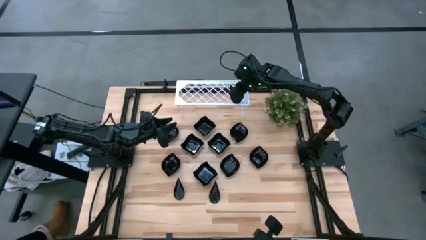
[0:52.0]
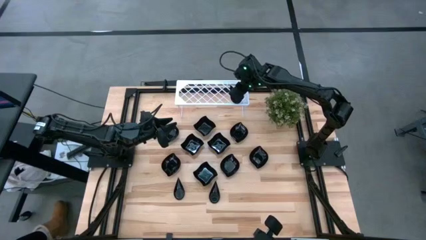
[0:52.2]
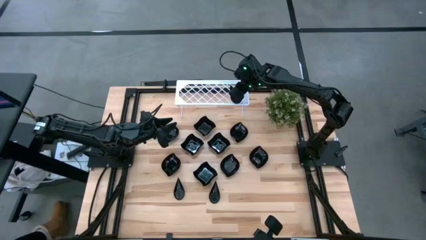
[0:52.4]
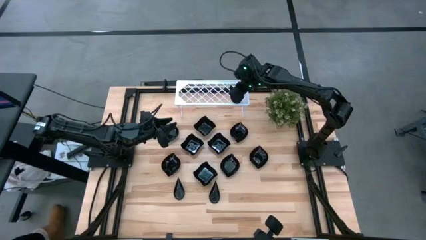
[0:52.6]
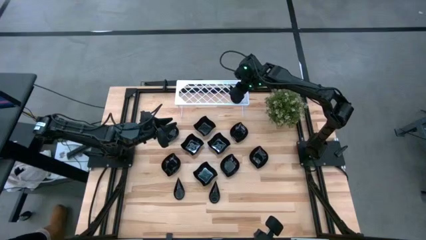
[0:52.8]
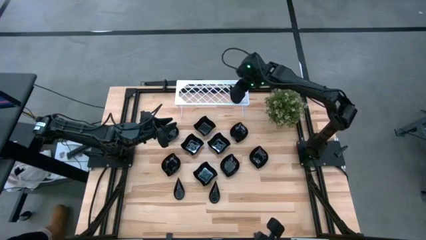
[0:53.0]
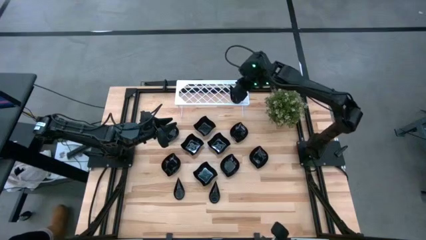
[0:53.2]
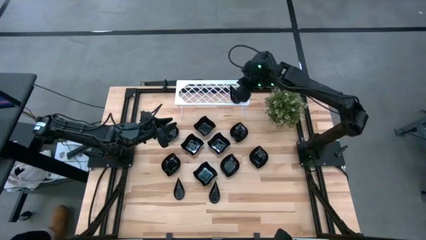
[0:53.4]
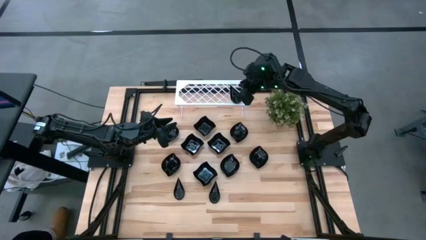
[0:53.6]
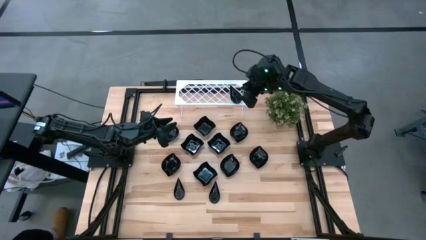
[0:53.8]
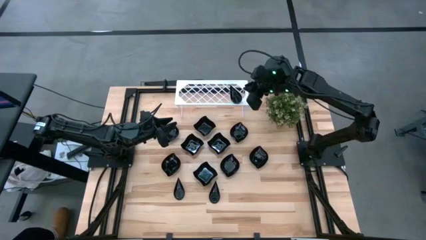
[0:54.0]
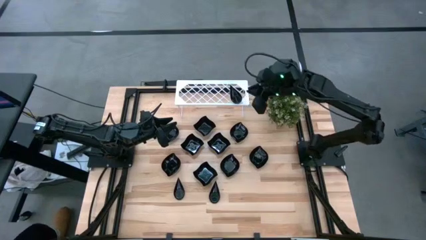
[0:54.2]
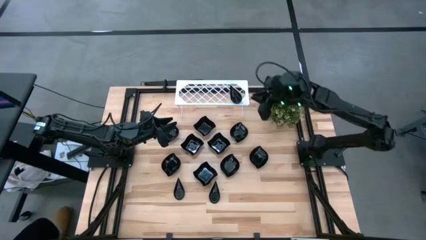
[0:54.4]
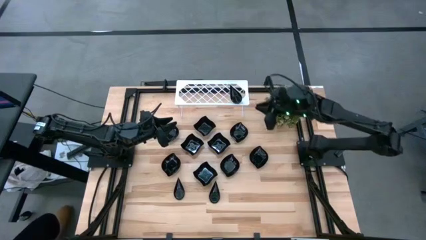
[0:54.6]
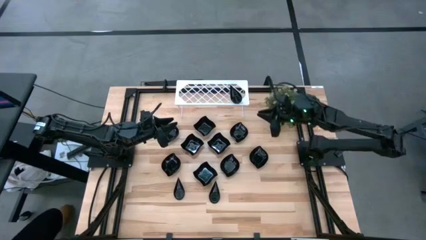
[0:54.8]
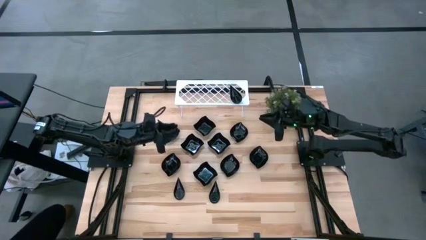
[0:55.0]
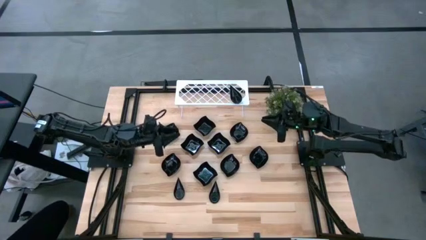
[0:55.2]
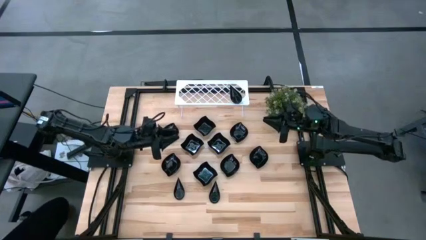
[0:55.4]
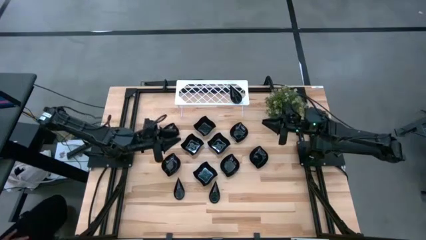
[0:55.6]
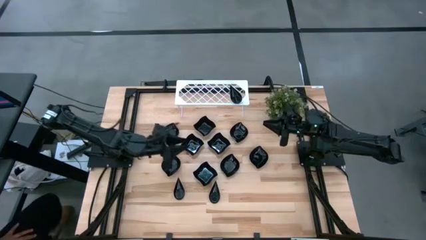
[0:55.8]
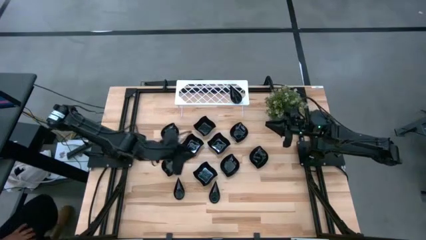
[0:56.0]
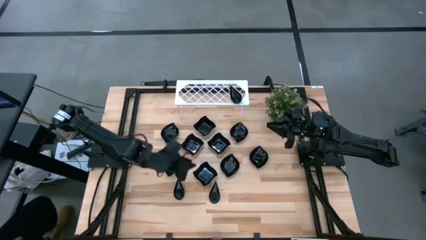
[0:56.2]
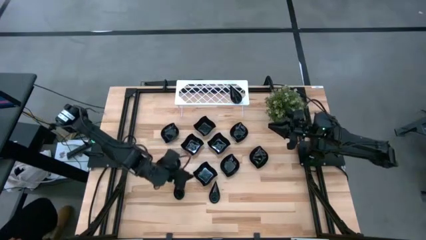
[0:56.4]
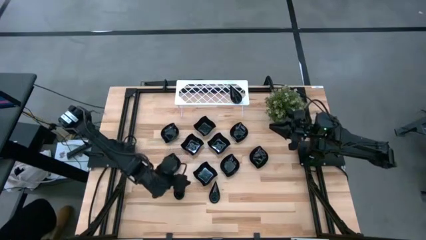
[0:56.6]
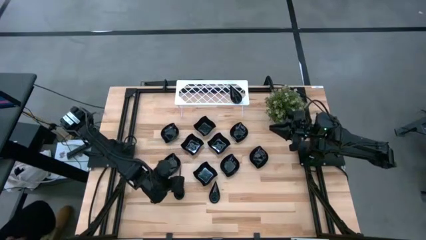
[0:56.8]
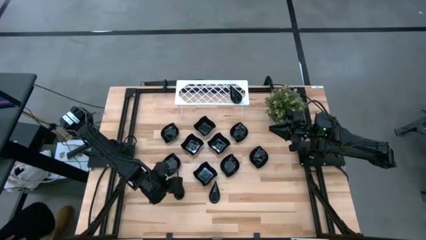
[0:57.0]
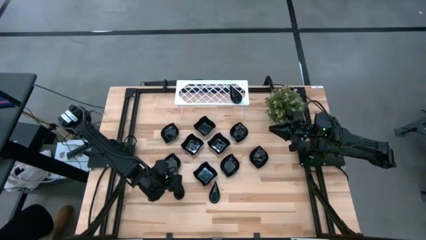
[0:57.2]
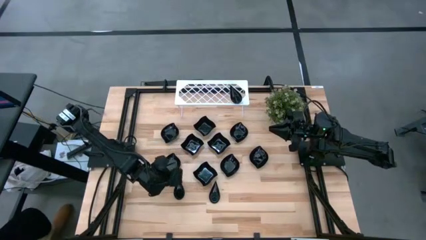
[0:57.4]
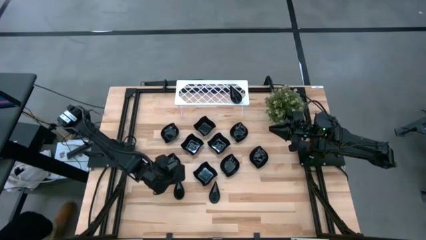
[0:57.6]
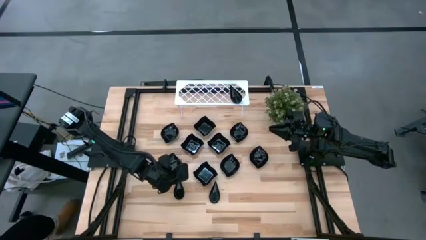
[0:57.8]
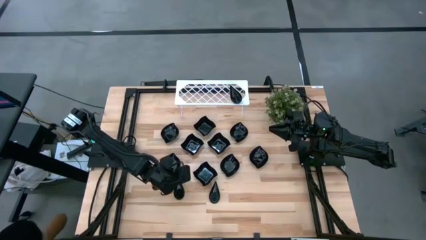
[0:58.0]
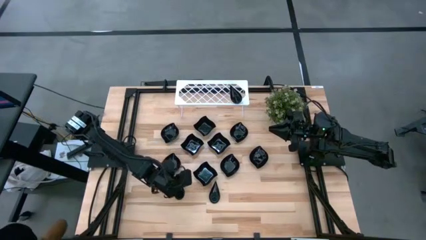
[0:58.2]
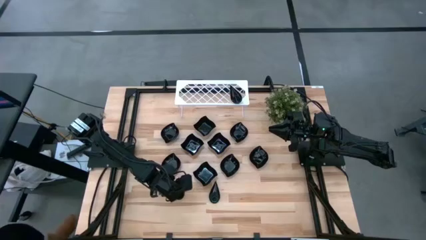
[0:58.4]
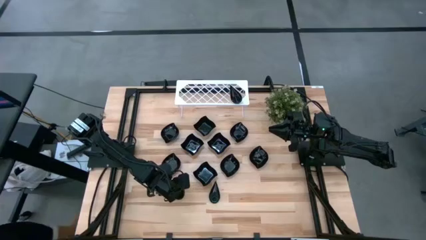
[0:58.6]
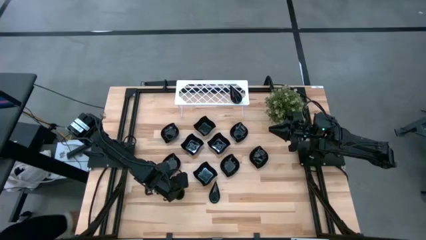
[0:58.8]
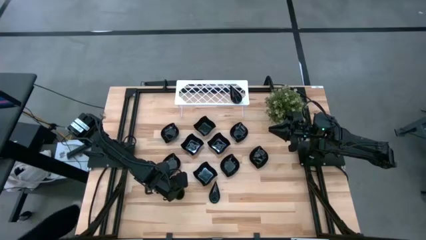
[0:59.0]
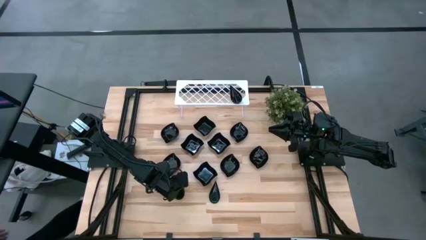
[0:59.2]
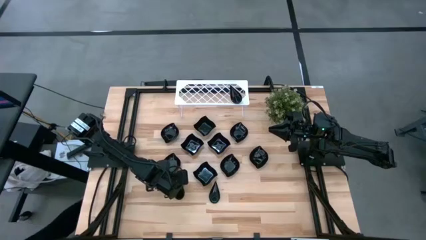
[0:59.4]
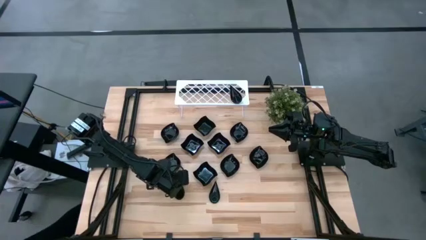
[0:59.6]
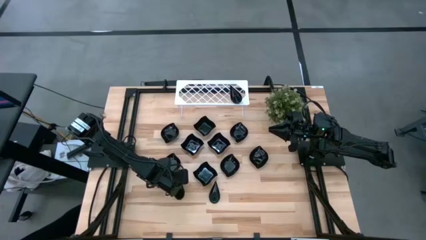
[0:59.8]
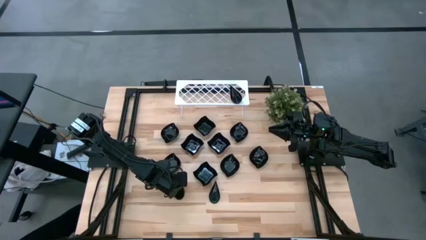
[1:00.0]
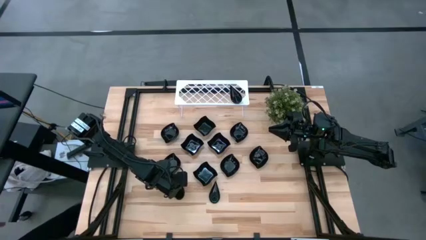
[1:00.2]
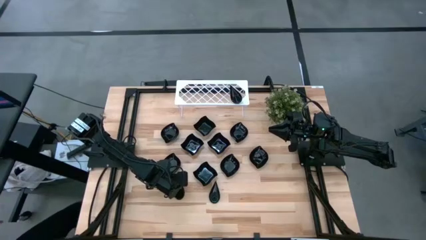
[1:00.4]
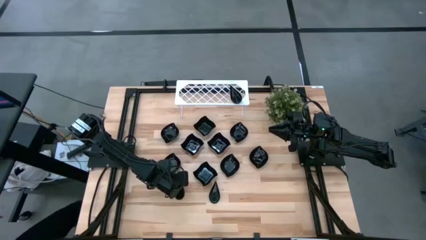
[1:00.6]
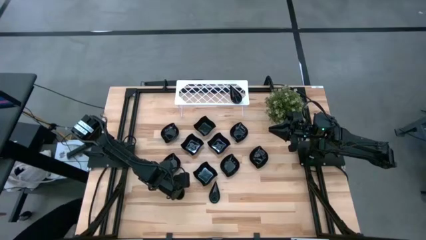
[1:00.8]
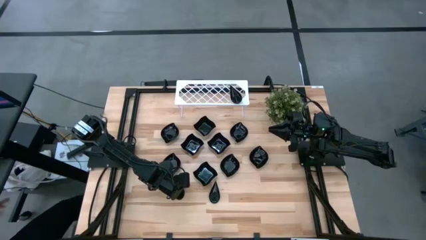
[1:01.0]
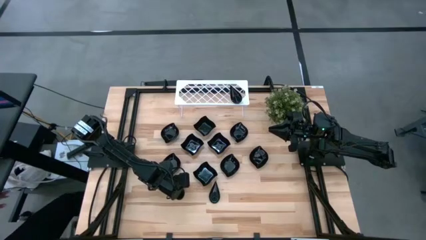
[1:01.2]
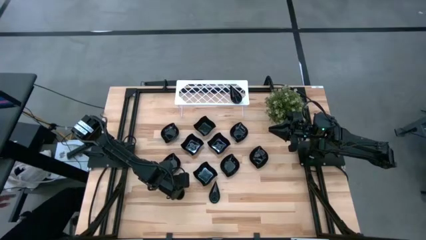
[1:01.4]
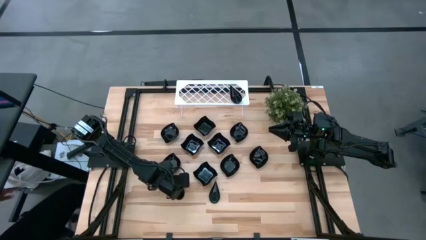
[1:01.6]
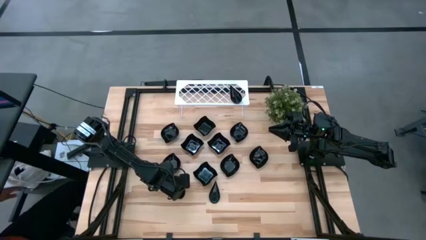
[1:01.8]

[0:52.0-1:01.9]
Task: Pick & Place Mini shaped plates
Stack the drop-shaped plate on top of the other drop-shaped plates on the shelf
